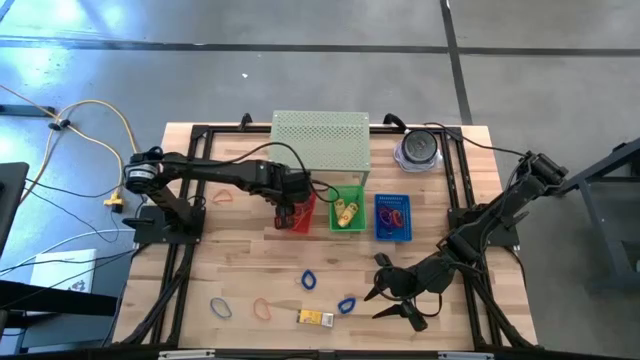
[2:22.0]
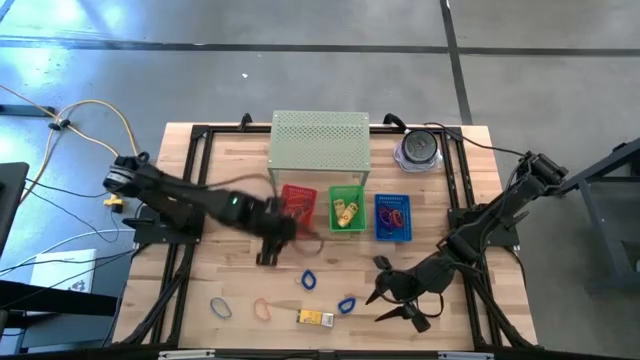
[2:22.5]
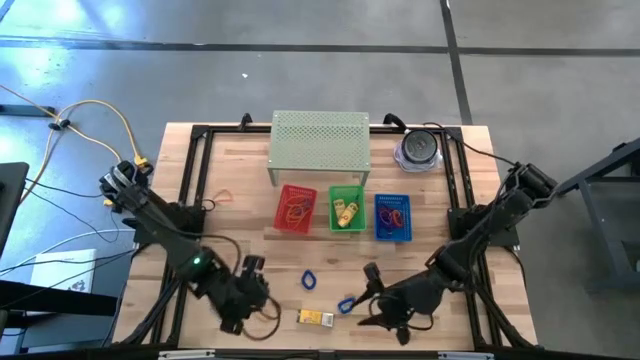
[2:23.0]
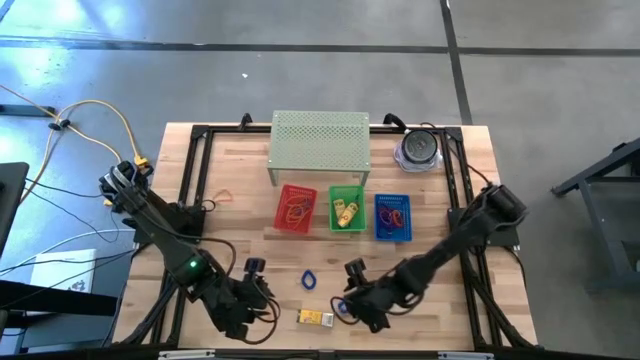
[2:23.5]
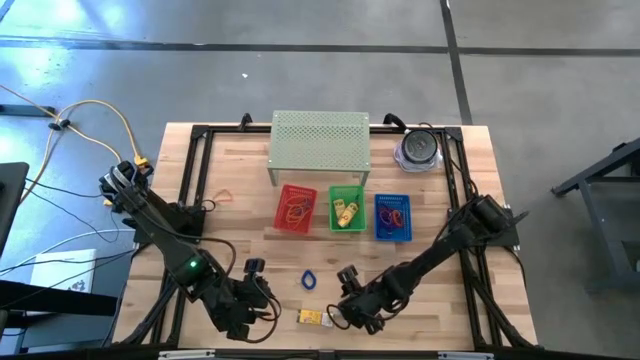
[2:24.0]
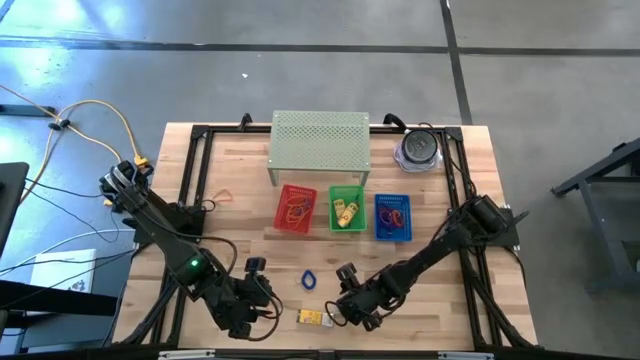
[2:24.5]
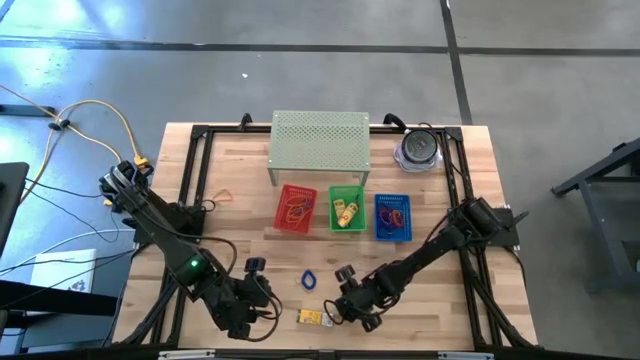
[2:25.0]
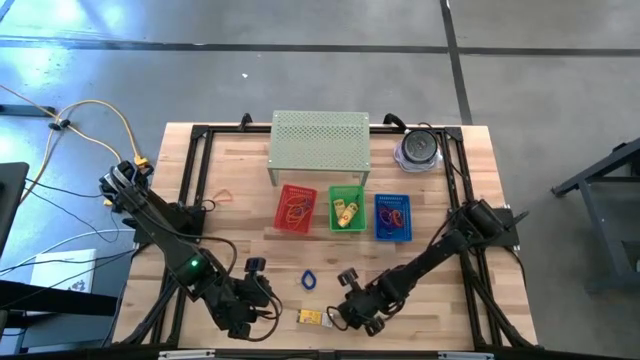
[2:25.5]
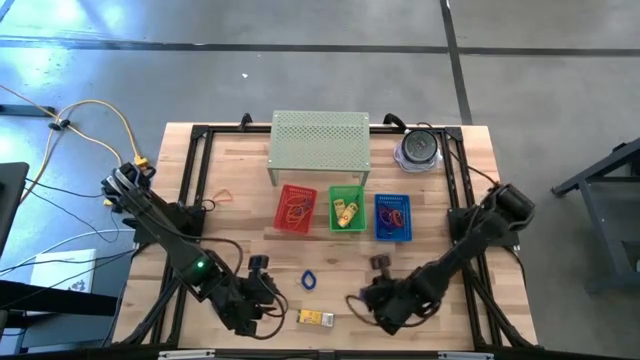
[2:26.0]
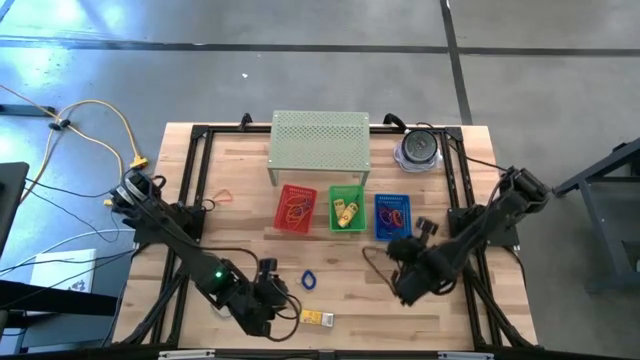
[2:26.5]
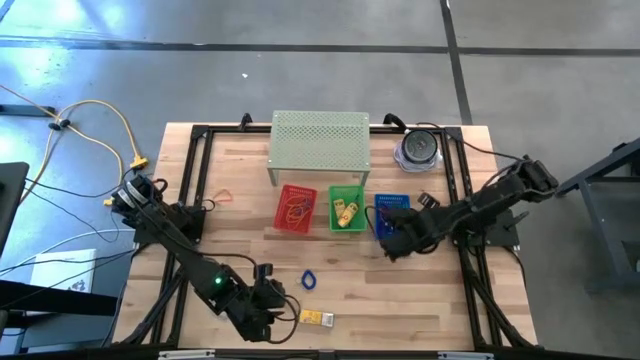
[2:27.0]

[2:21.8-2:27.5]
Task: Pick & Place Office Desk Supplies
Put the right blue spring keychain into the blue bin

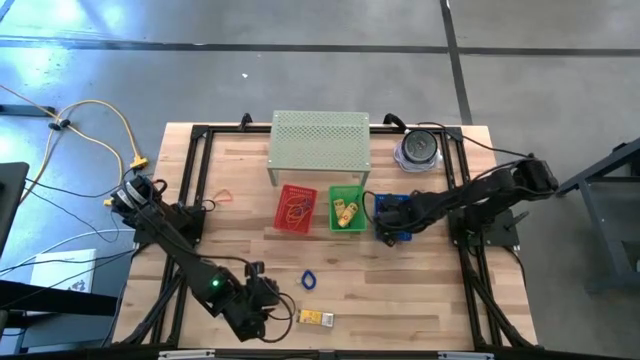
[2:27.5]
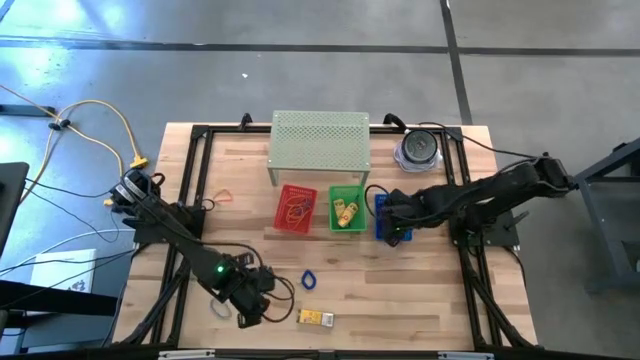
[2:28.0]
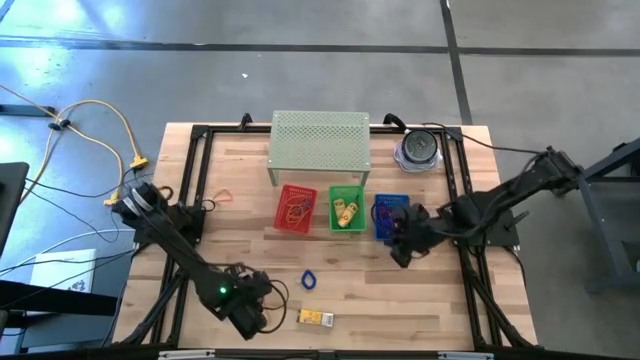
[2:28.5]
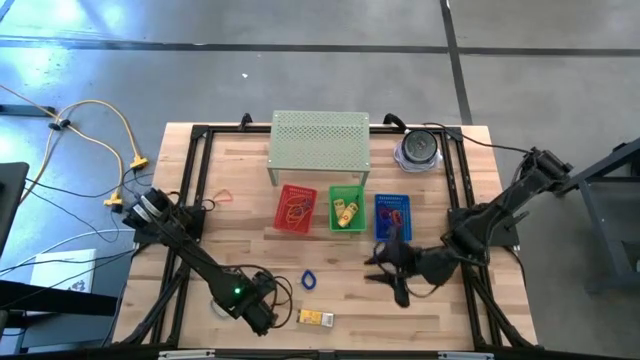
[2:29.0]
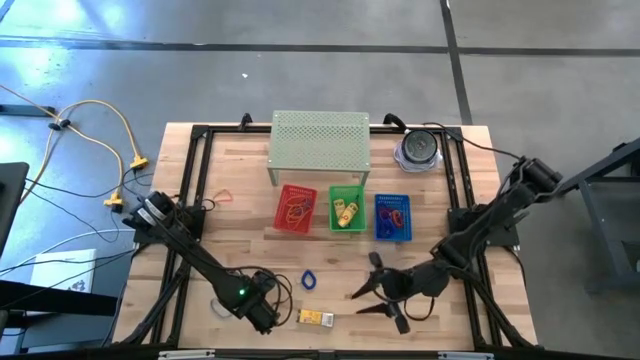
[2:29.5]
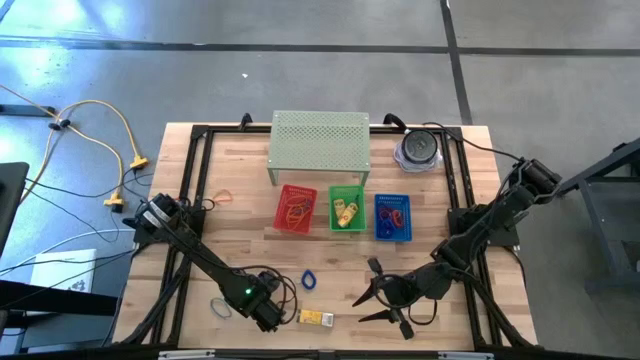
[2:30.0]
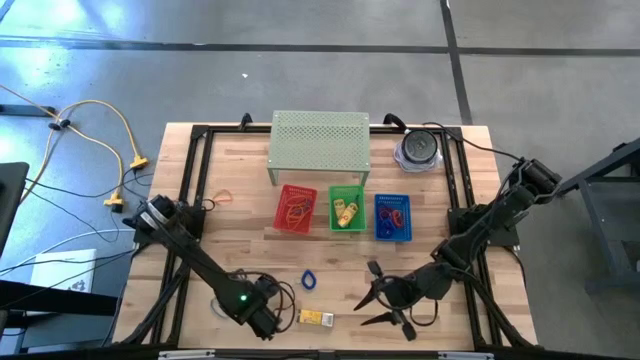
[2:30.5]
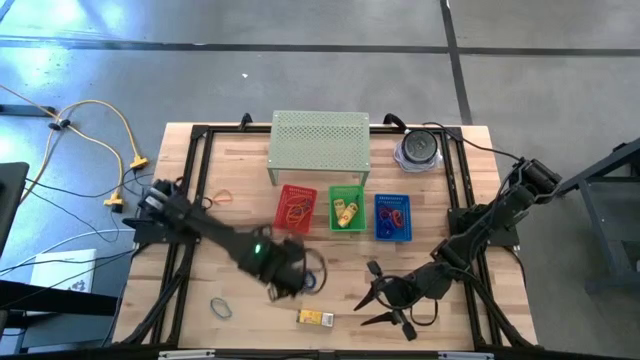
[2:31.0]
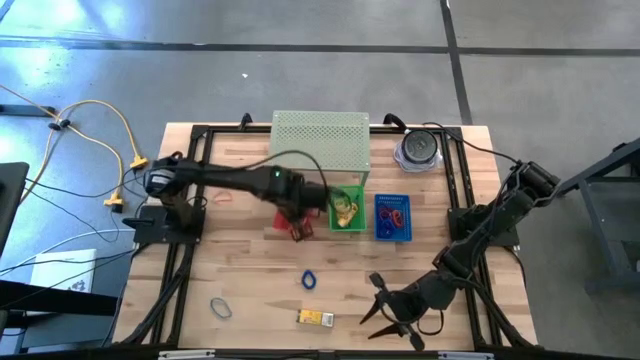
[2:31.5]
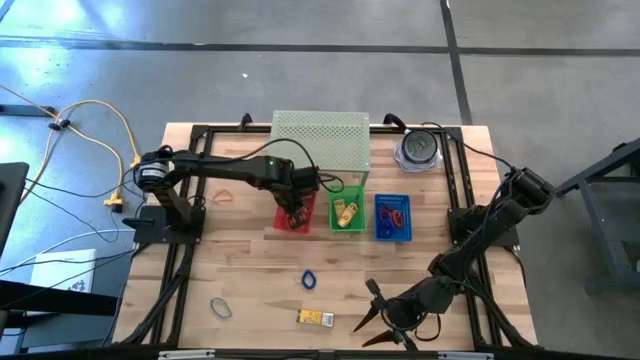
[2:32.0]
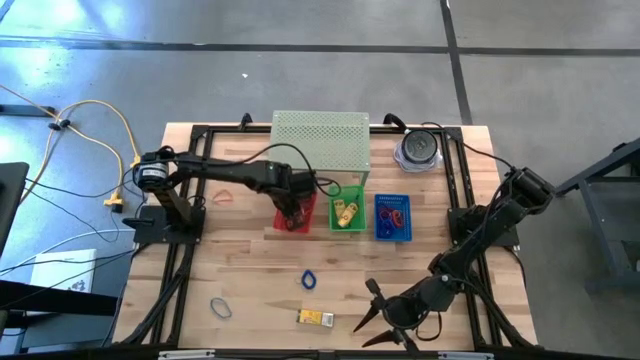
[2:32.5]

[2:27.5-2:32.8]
Put the bottom orange rubber band into the red bin

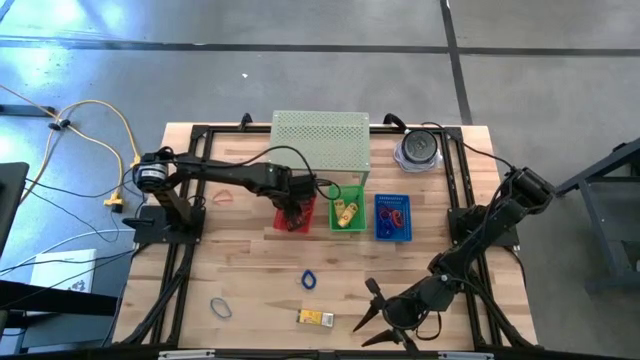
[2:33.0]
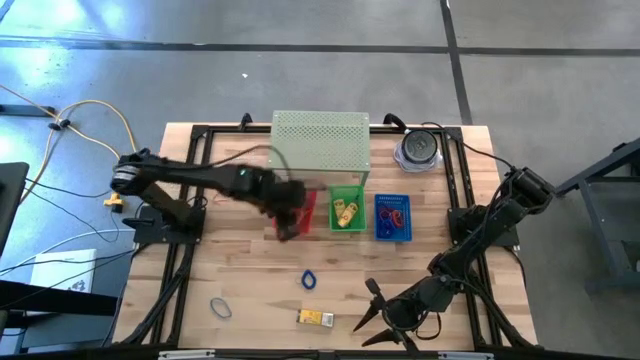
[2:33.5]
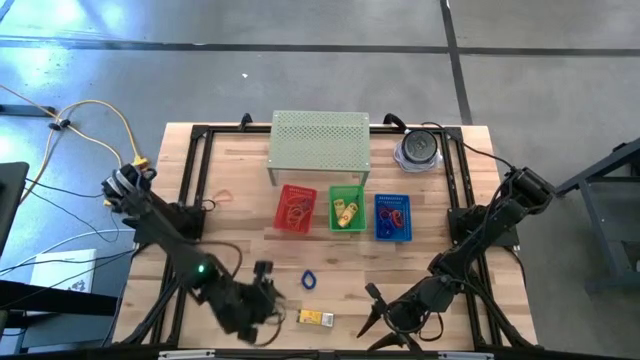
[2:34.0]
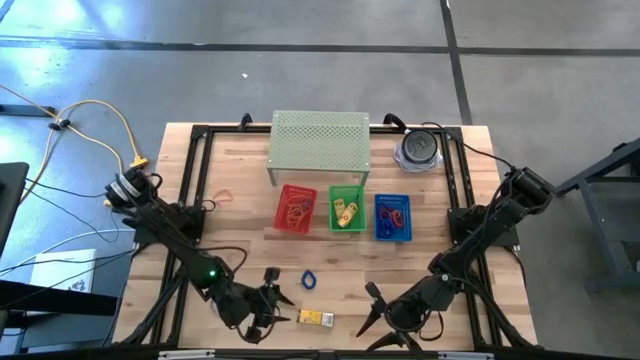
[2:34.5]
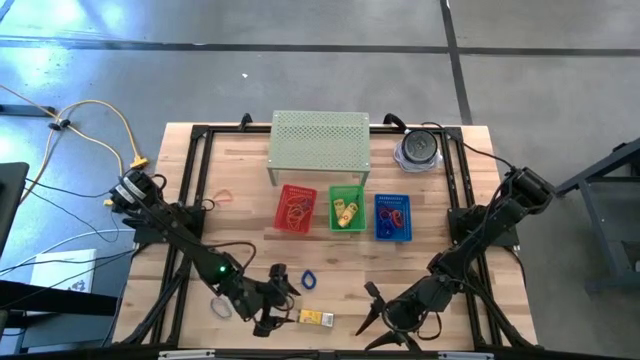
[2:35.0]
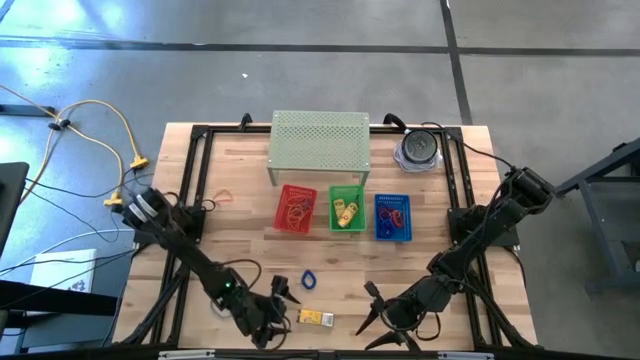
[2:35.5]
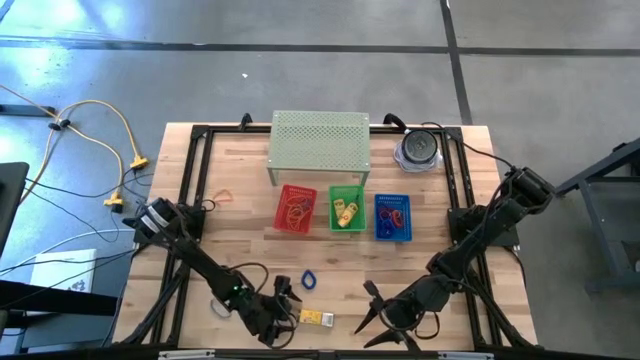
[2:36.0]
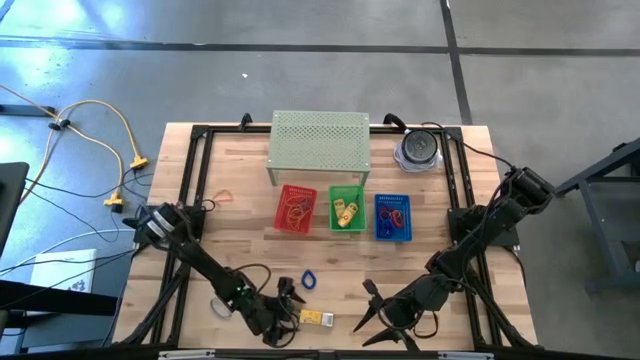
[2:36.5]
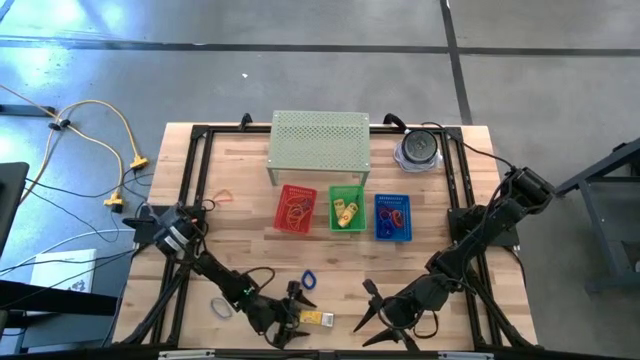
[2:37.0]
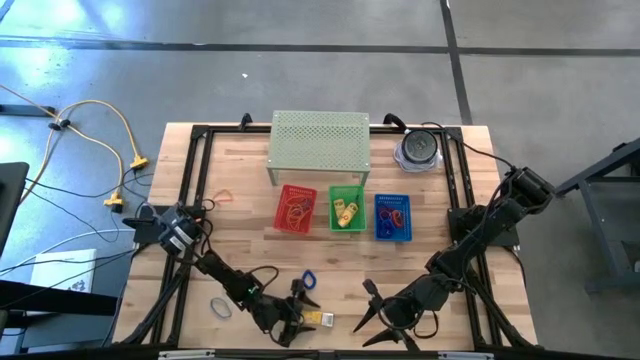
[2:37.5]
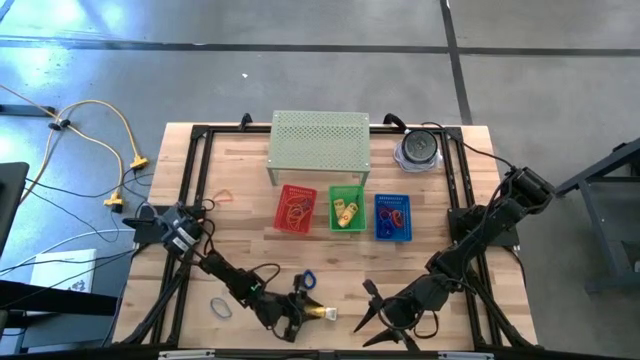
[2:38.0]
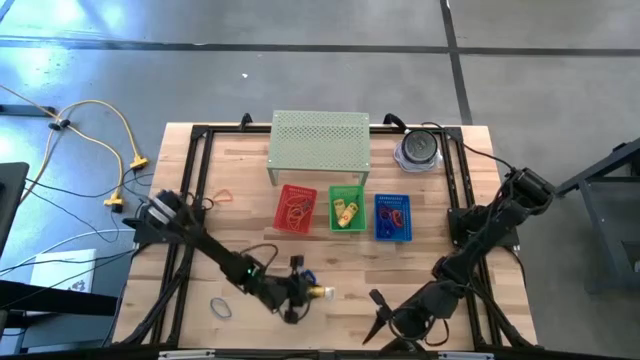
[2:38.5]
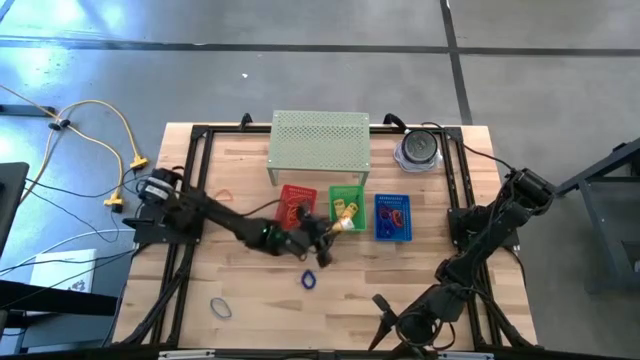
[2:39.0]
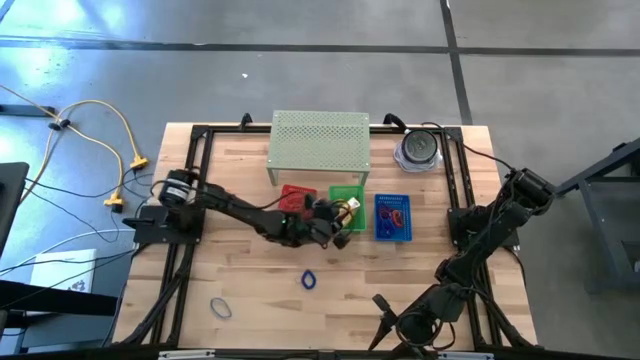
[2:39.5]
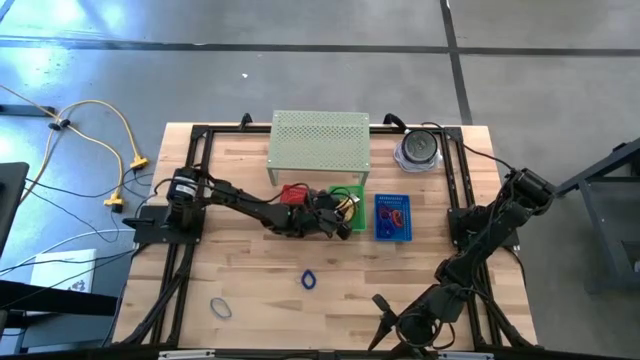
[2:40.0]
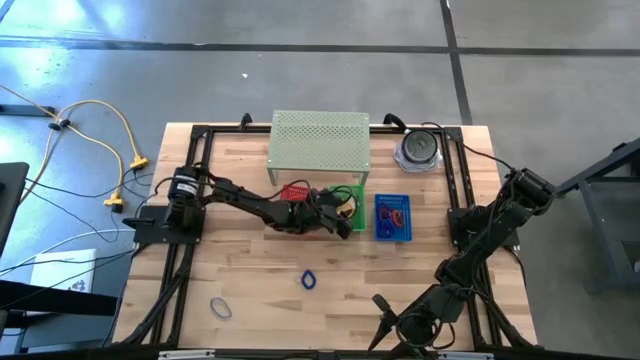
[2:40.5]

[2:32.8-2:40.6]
Put the yellow crayon box into the green bin

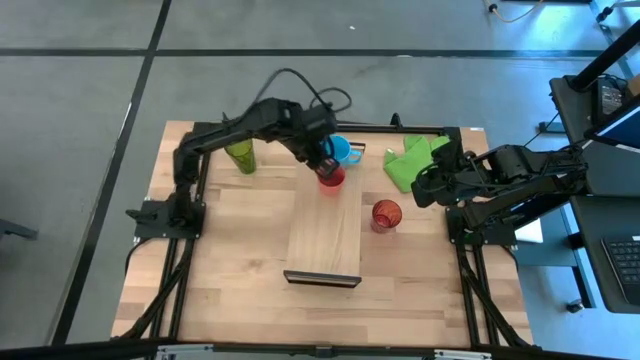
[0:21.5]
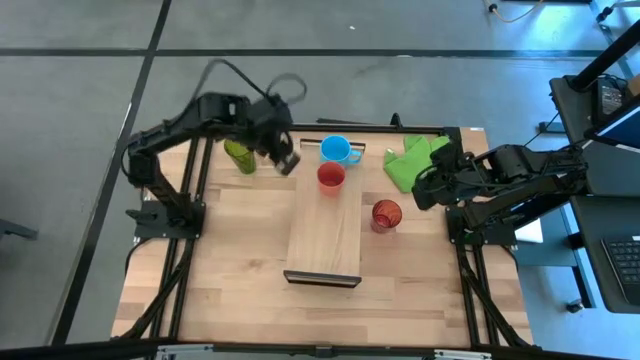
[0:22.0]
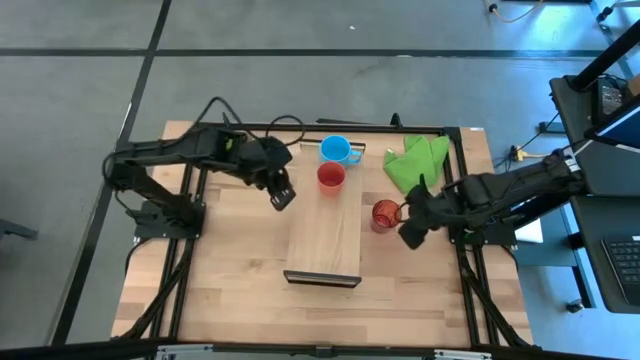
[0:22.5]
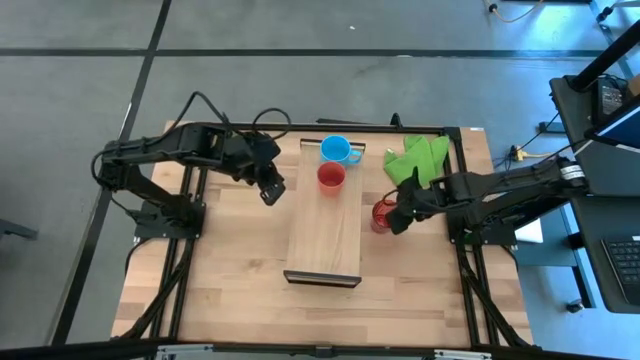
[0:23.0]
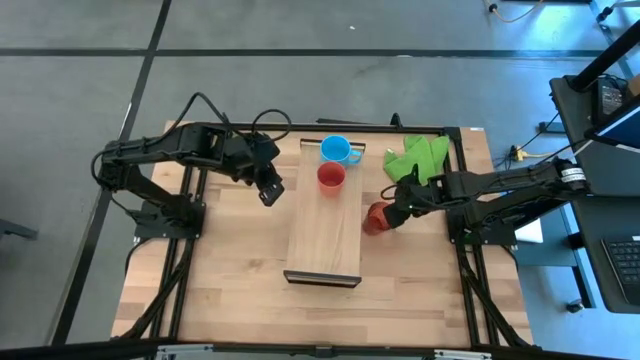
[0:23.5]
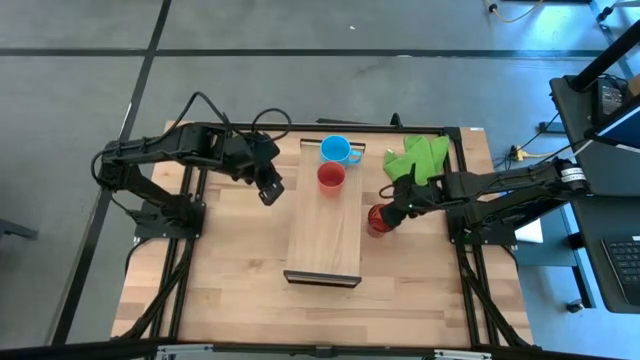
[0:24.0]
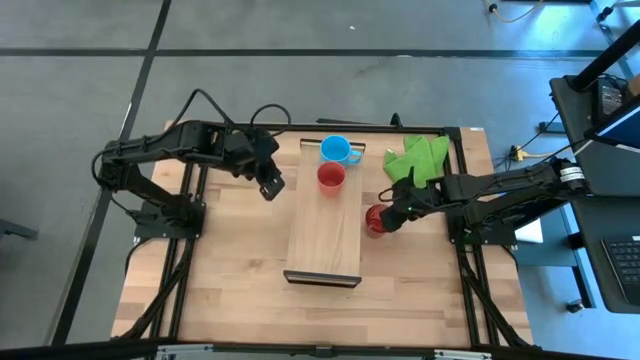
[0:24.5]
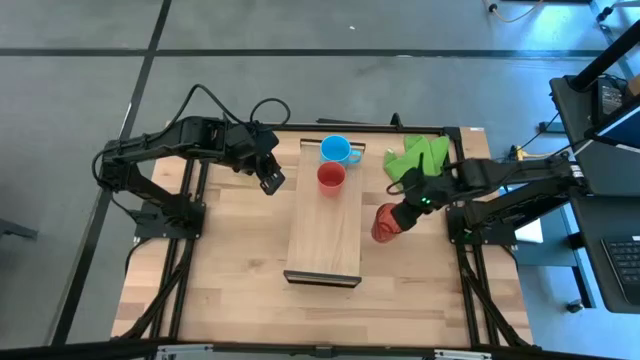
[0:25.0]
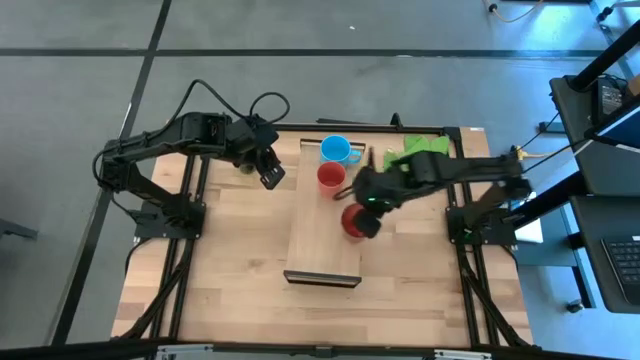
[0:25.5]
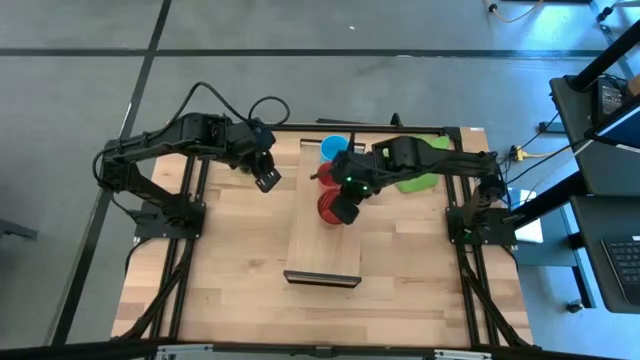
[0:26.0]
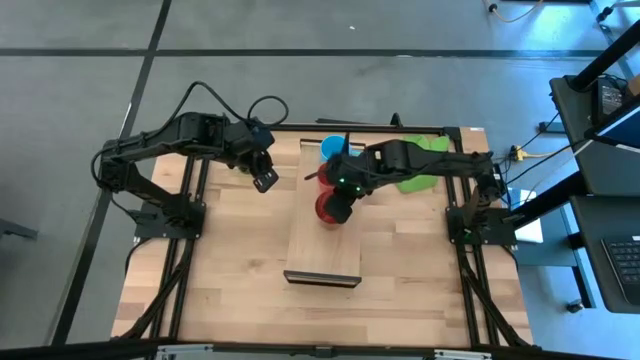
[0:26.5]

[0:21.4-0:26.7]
Task: Stack small to large cups/mugs on shelf
Put the orange cup on the shelf
